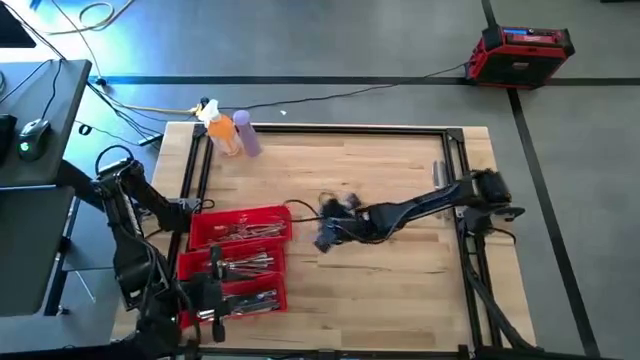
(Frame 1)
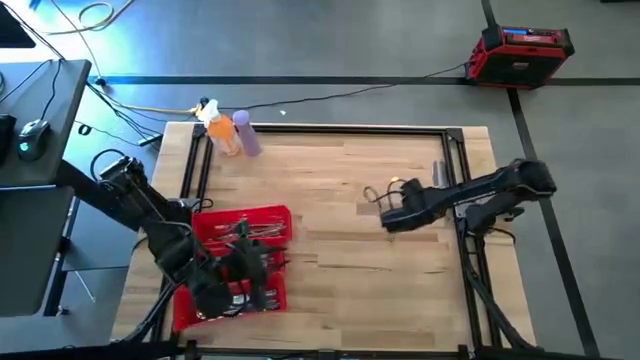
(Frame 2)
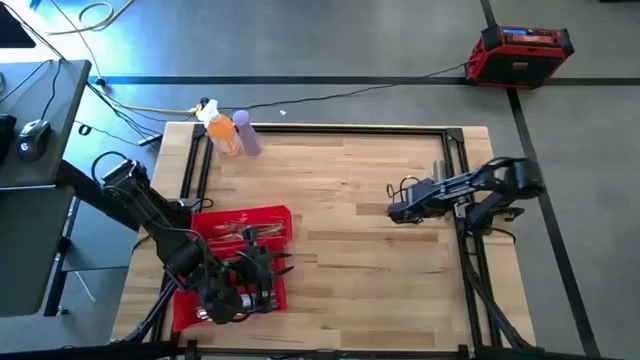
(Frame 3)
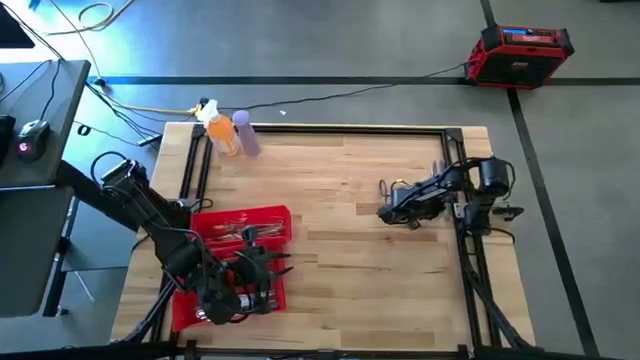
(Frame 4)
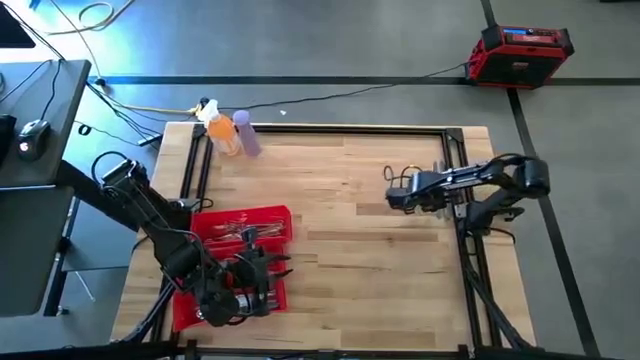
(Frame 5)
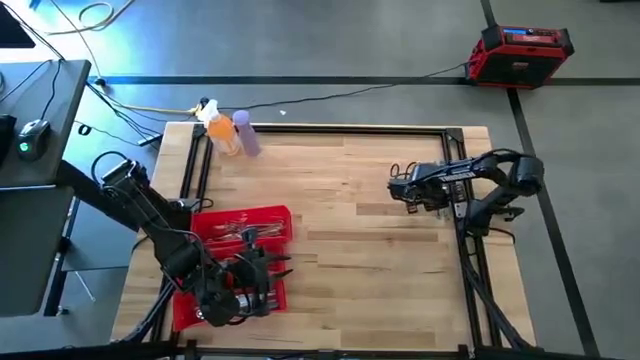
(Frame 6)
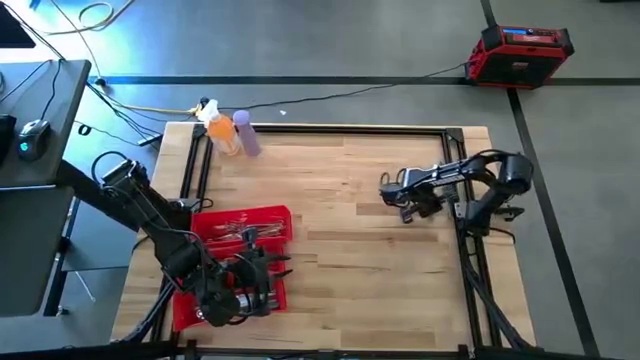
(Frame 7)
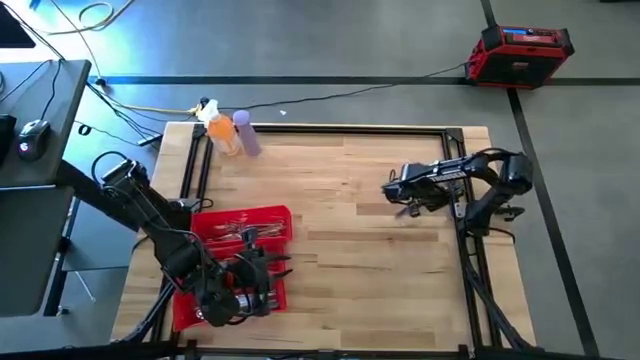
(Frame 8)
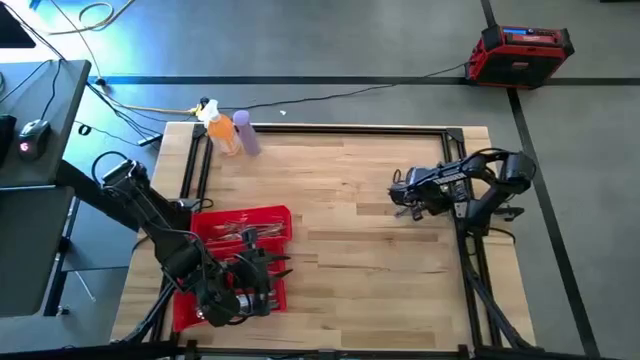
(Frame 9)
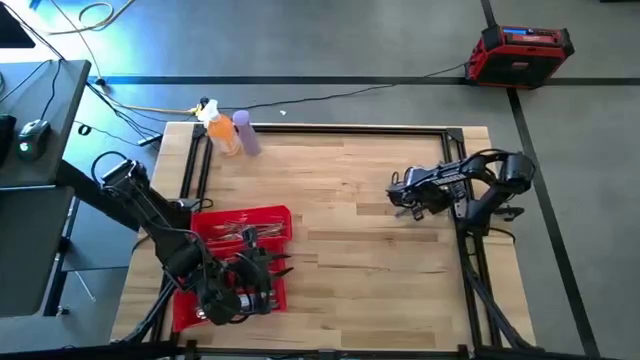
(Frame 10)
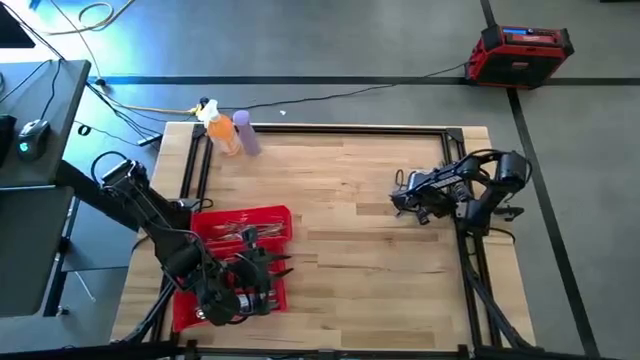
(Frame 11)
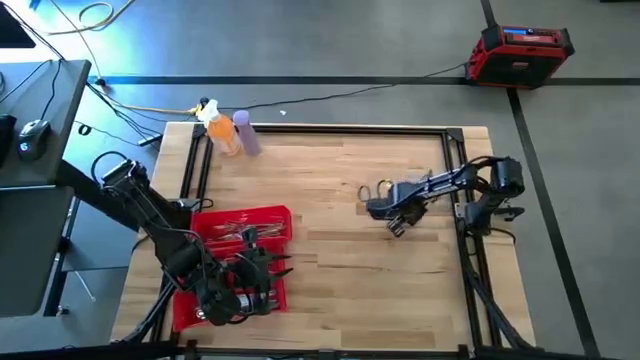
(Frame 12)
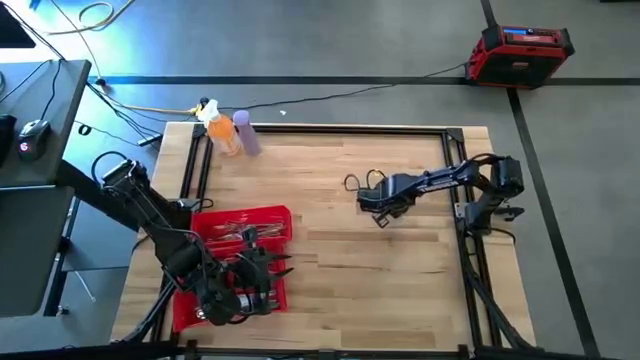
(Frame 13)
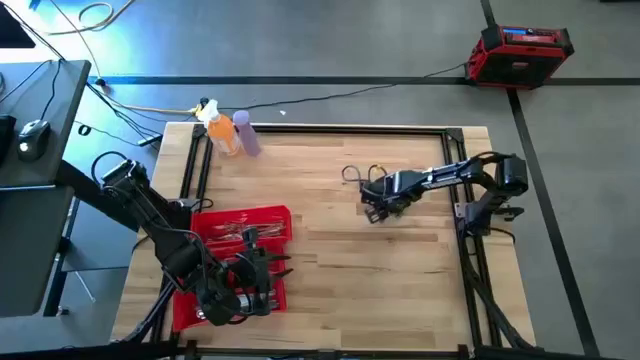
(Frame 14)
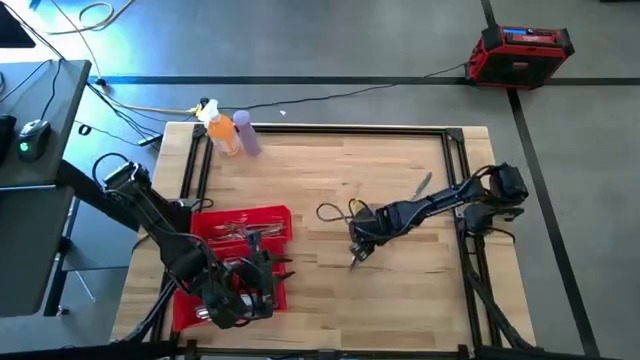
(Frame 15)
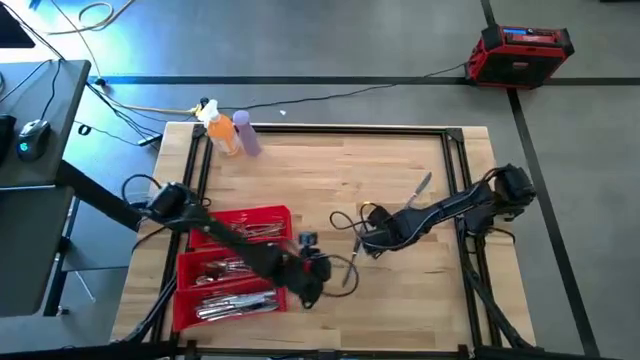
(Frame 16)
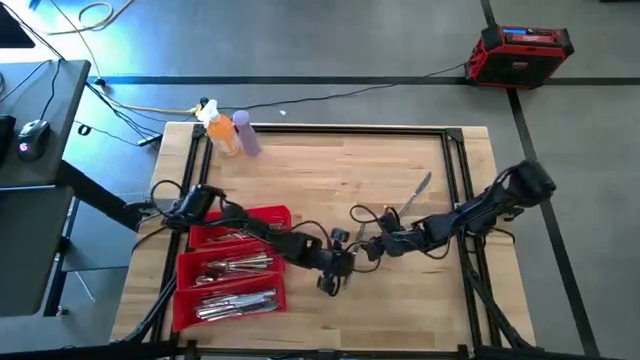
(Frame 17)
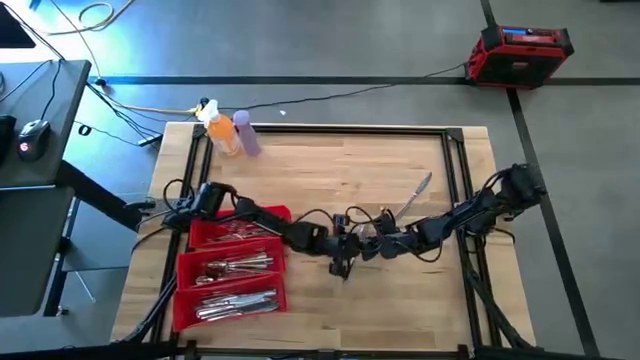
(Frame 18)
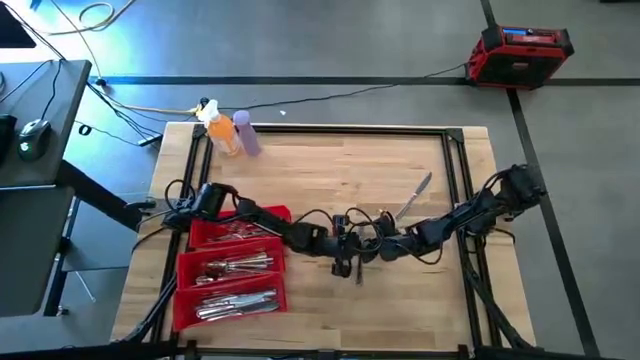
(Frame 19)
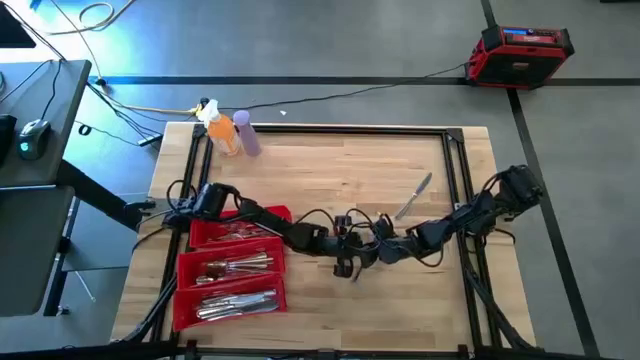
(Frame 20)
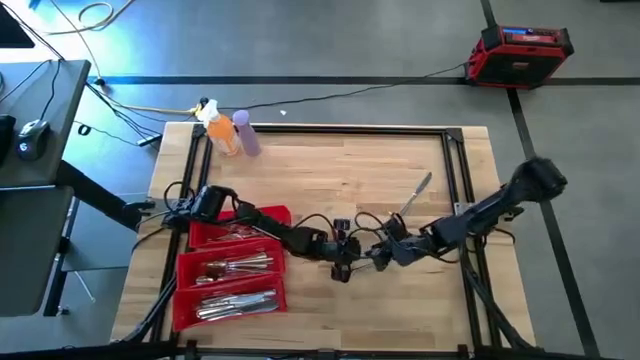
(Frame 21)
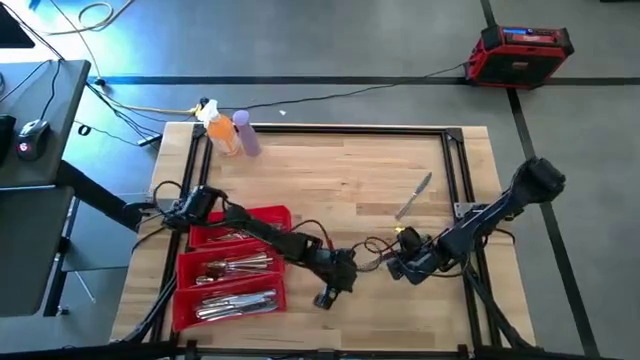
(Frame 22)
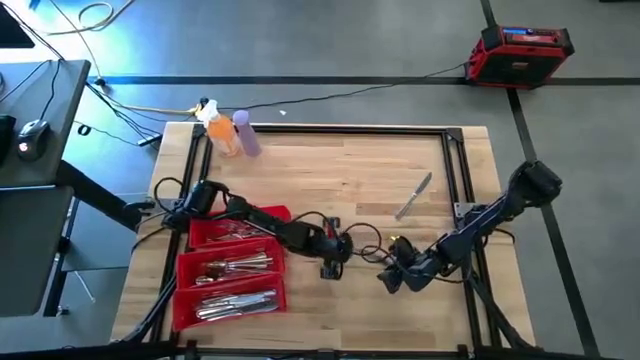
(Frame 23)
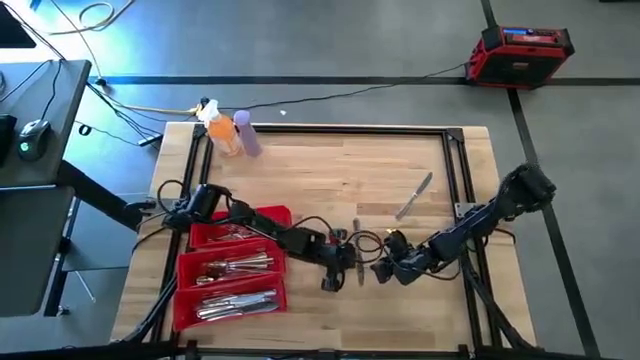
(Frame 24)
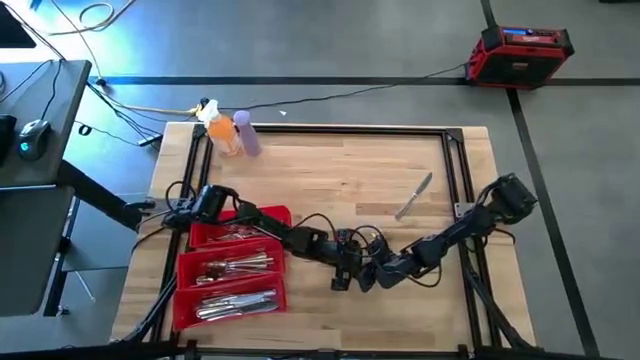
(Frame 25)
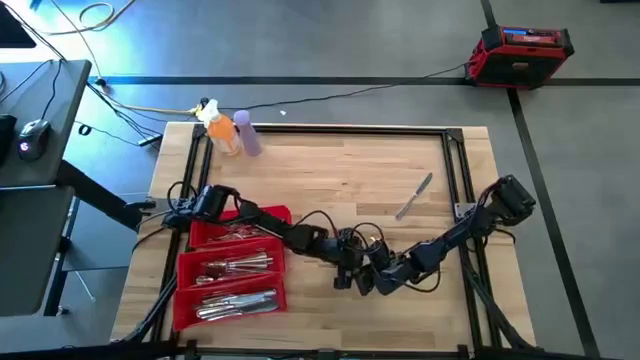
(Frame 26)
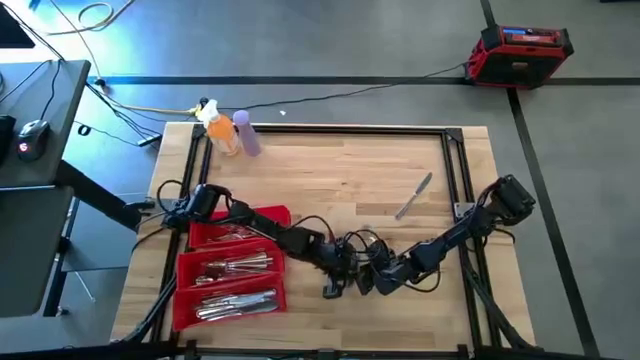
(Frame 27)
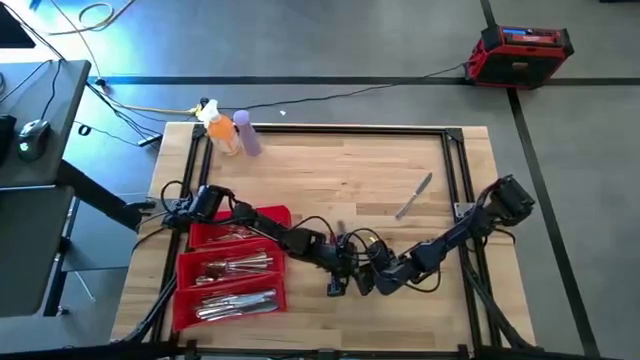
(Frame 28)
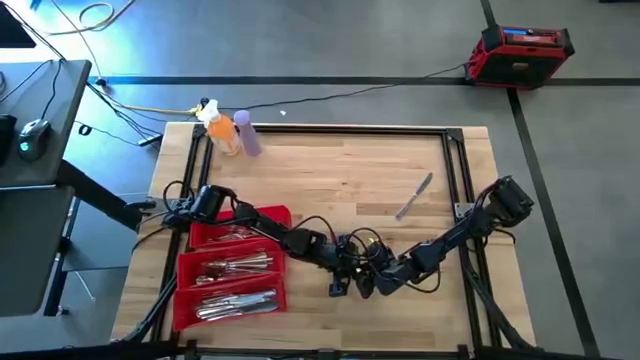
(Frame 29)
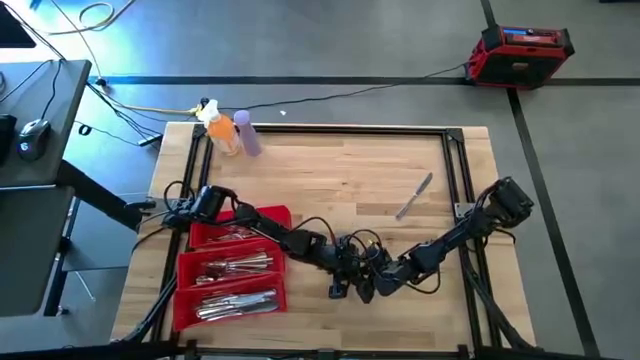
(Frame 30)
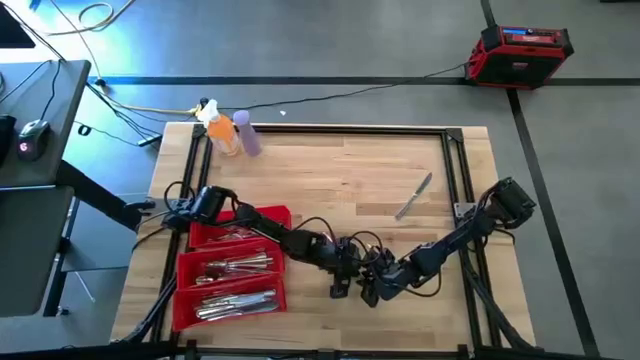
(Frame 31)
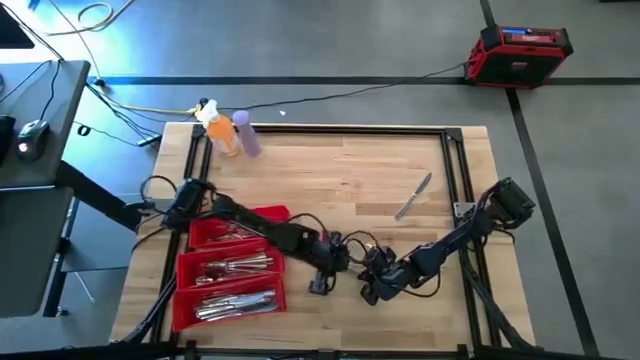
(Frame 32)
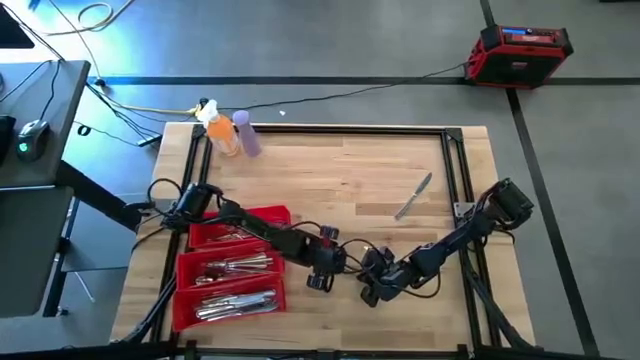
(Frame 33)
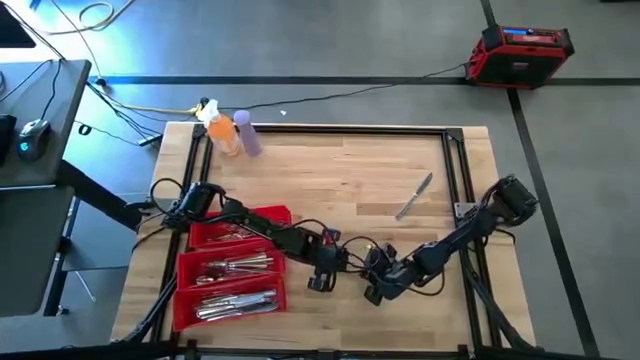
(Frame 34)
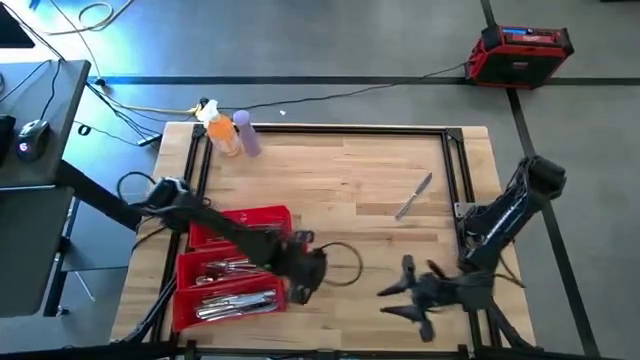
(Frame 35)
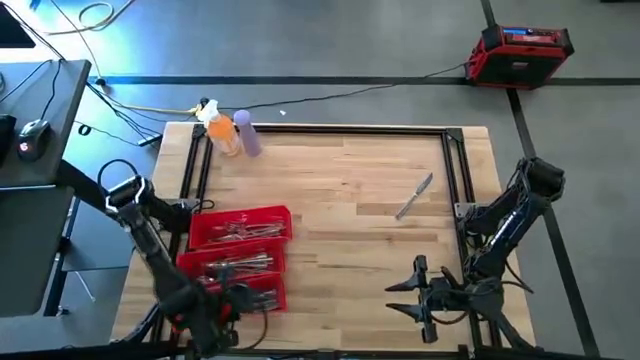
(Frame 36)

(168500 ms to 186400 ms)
Task: Sort silverware
Put the silver knife in the bottom red bin

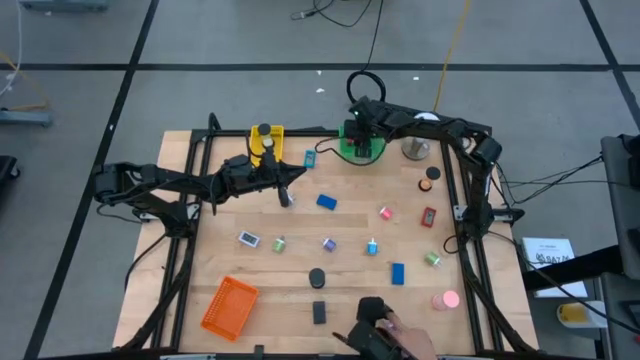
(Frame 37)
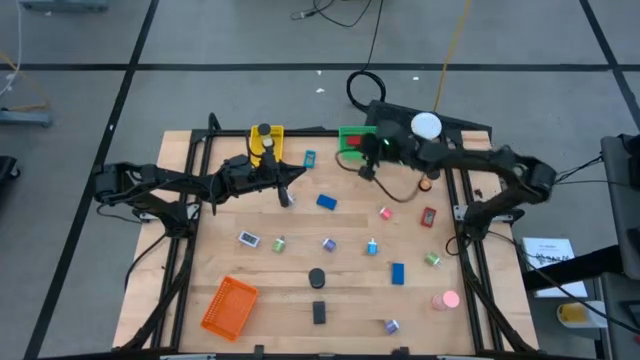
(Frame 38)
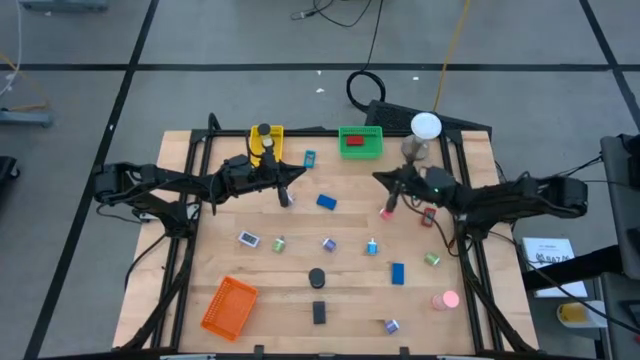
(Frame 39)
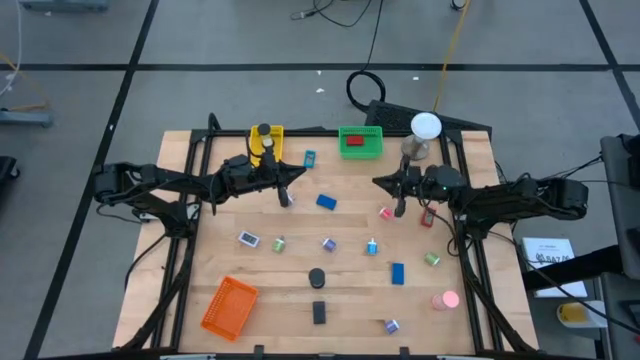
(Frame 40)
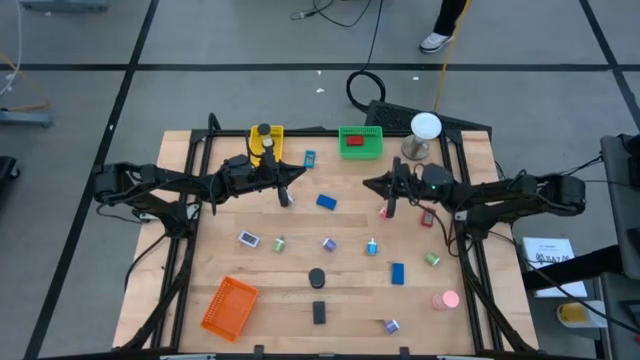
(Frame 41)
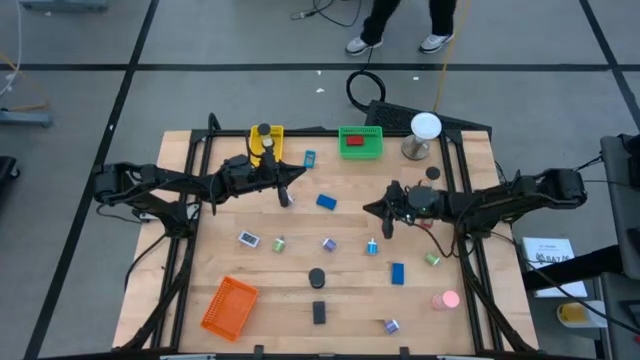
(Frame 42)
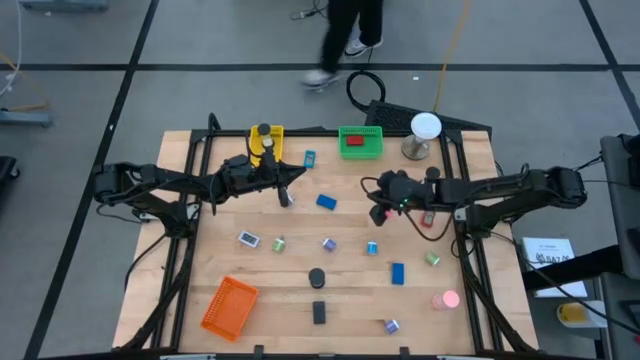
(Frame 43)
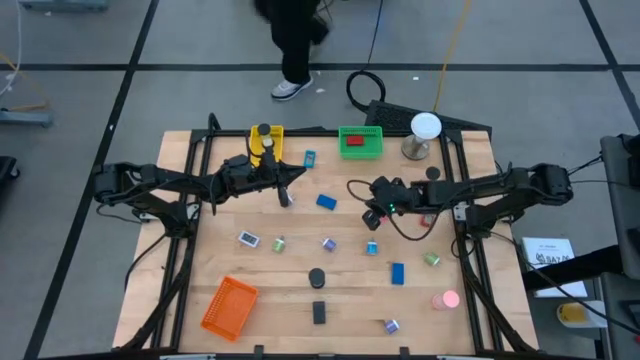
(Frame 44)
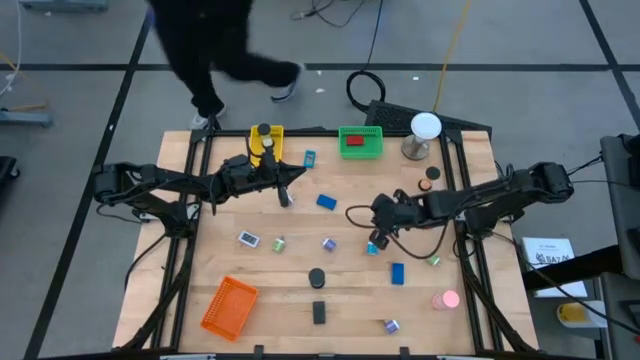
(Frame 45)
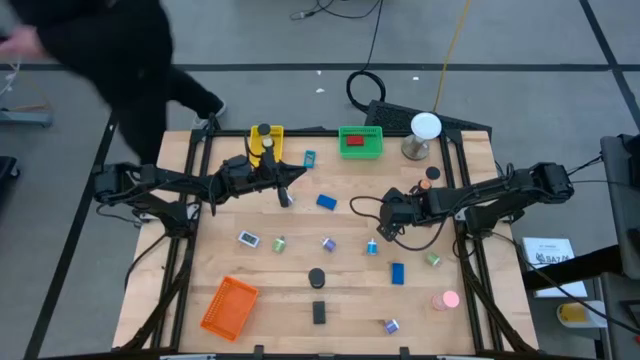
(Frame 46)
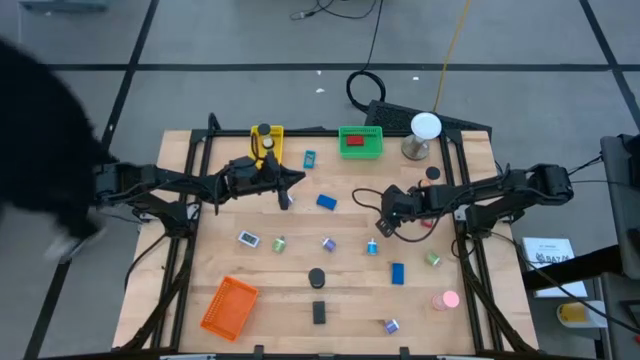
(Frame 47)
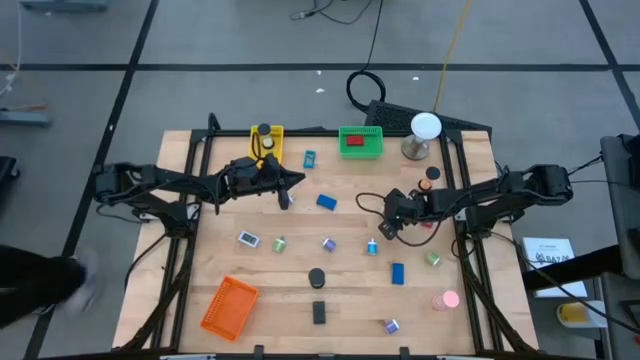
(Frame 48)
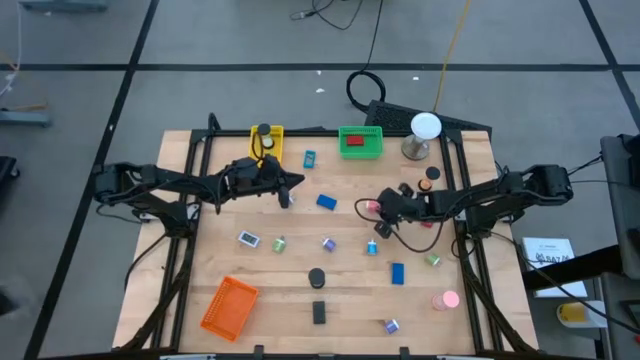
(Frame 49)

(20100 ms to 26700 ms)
Task: Pick & Place Office items
Put the pink charger adapter into the orange bin
